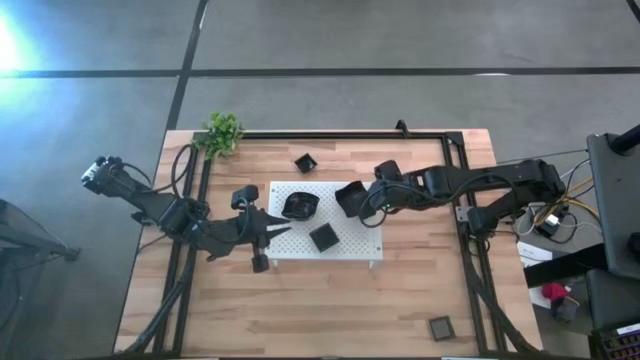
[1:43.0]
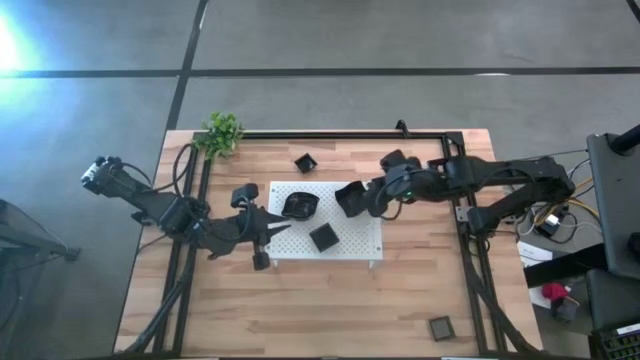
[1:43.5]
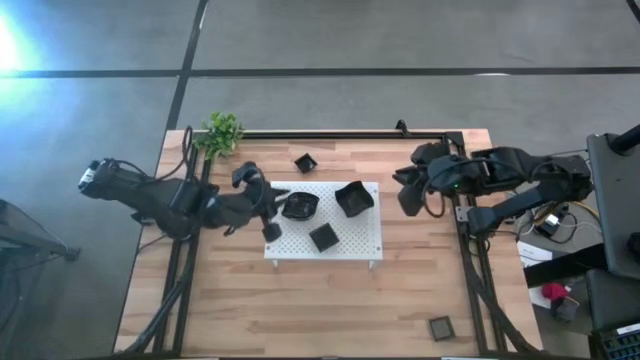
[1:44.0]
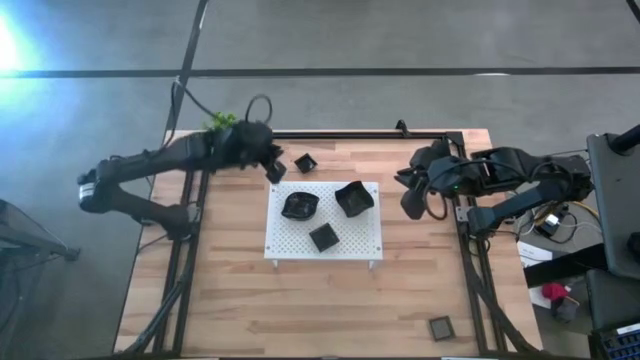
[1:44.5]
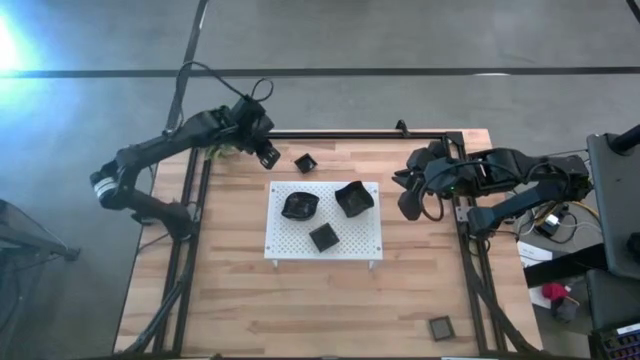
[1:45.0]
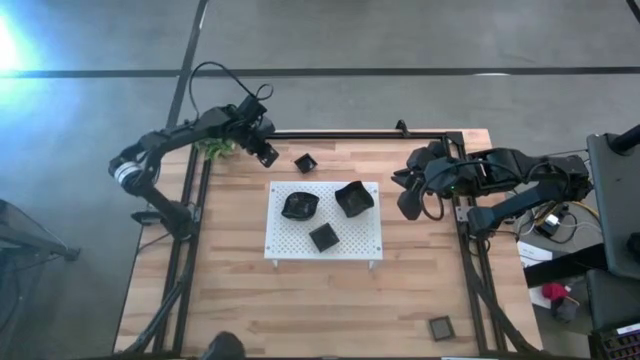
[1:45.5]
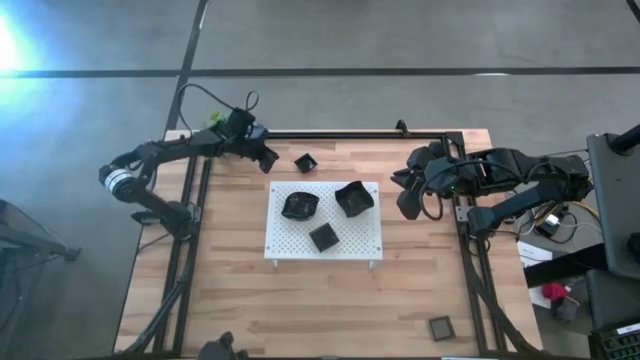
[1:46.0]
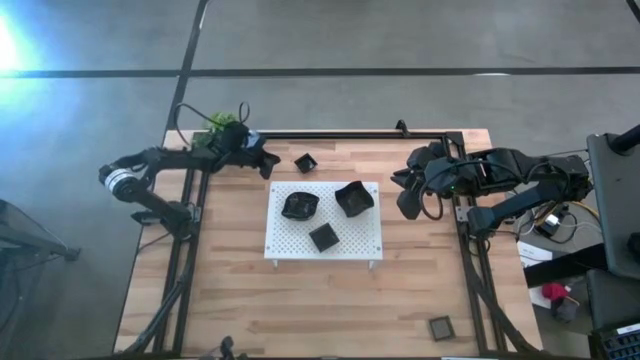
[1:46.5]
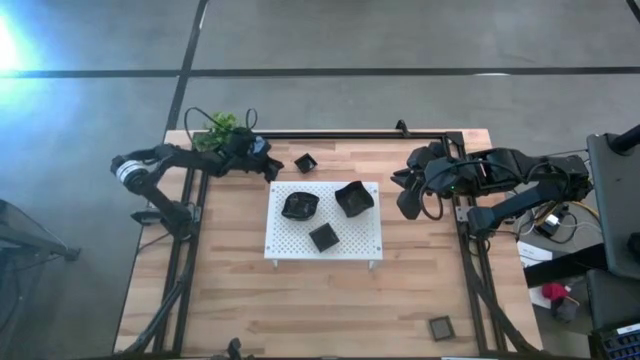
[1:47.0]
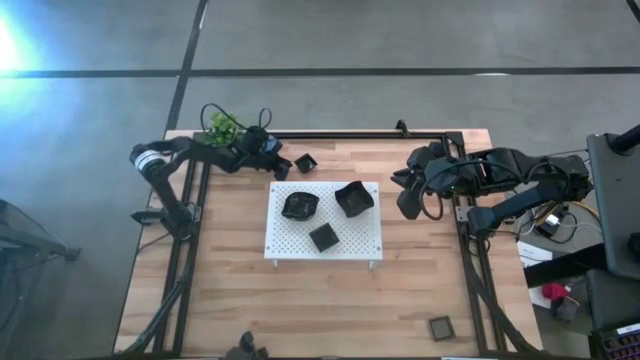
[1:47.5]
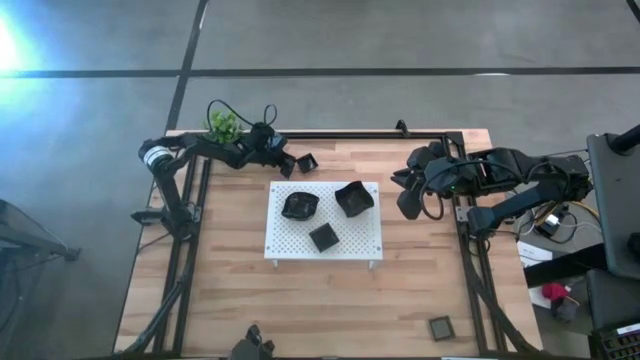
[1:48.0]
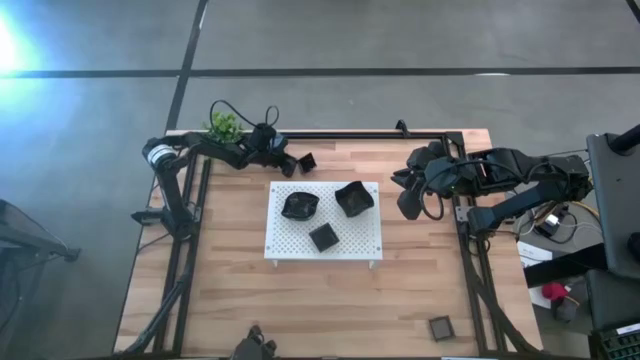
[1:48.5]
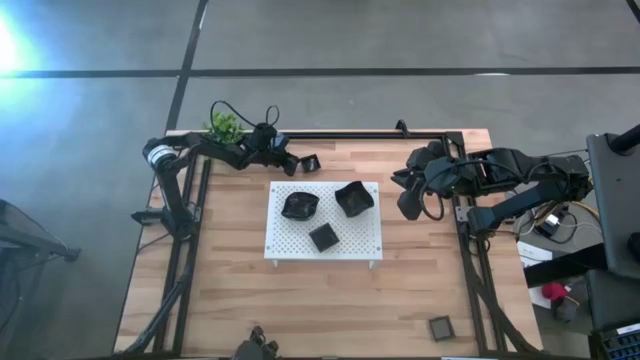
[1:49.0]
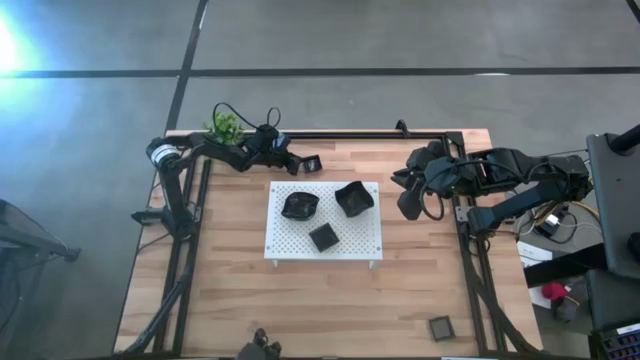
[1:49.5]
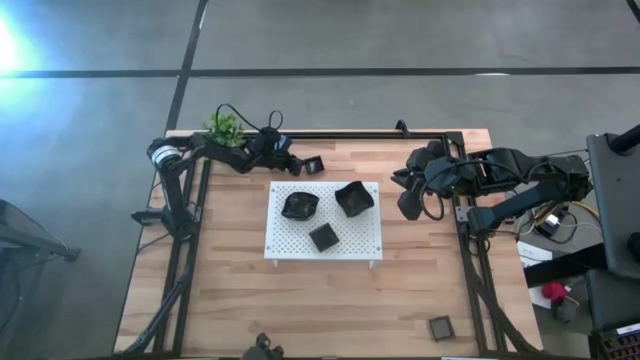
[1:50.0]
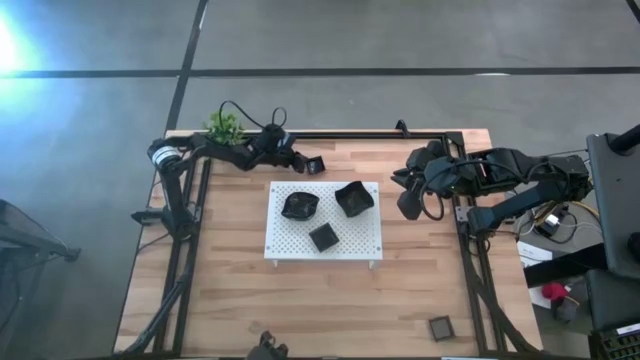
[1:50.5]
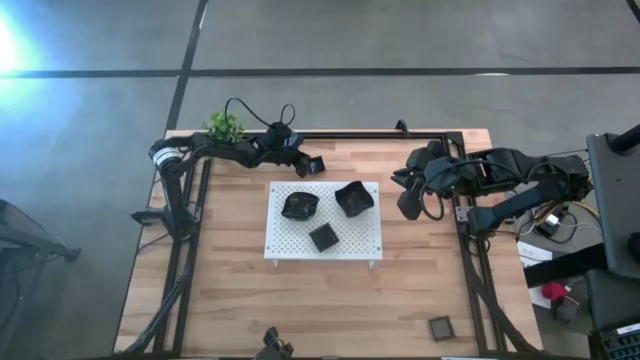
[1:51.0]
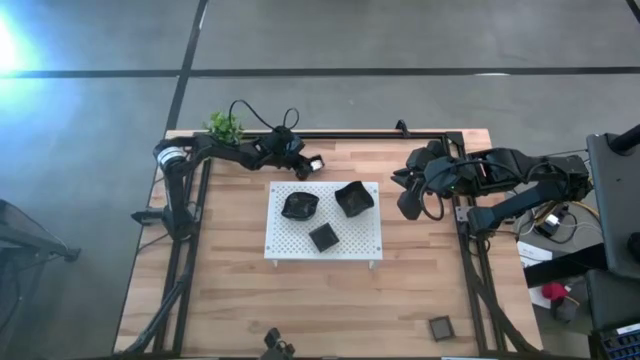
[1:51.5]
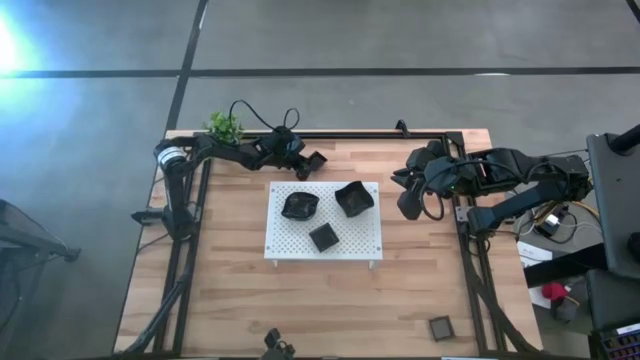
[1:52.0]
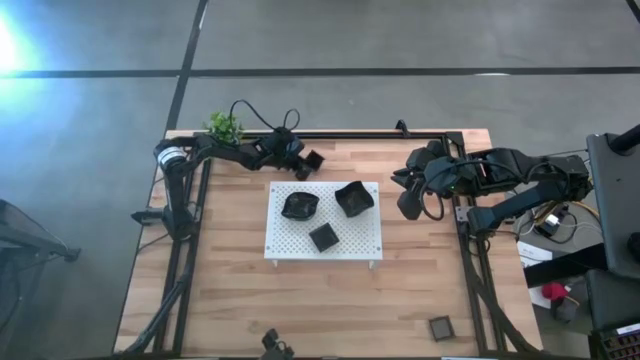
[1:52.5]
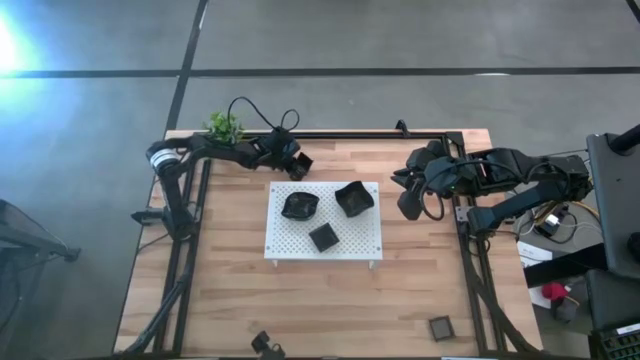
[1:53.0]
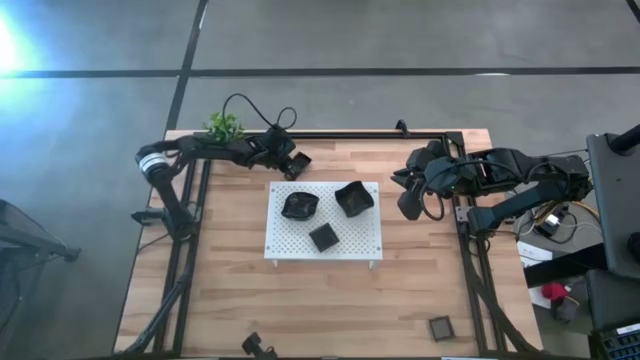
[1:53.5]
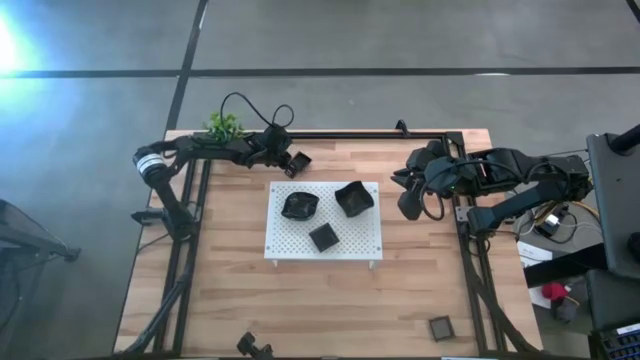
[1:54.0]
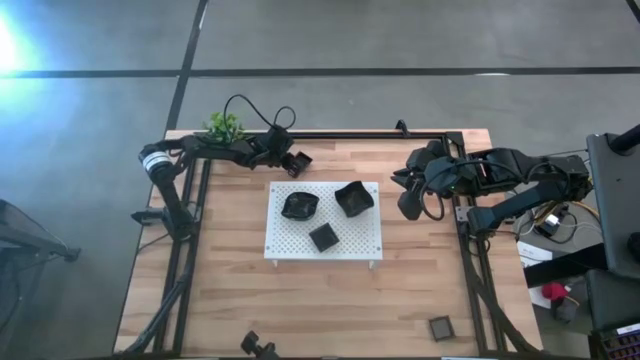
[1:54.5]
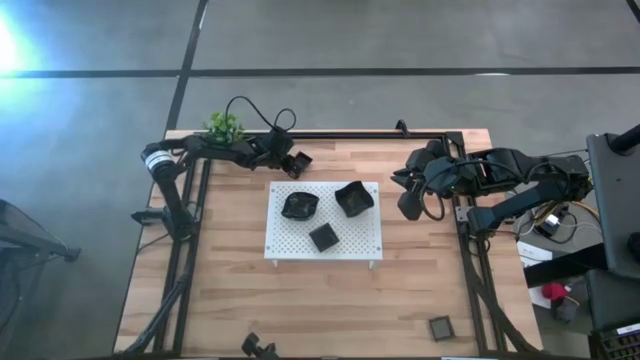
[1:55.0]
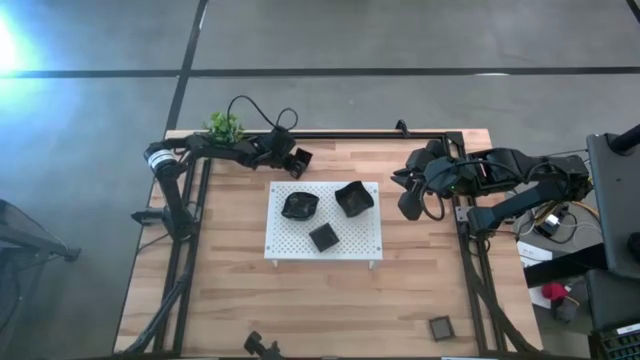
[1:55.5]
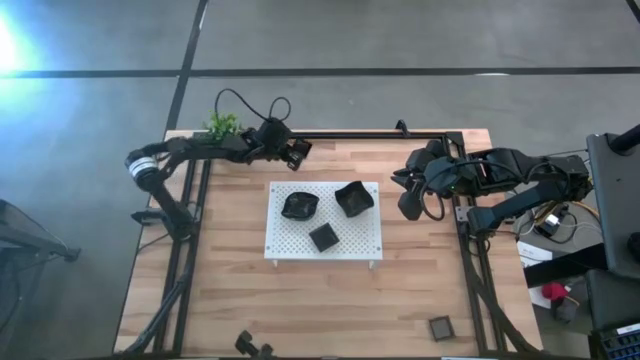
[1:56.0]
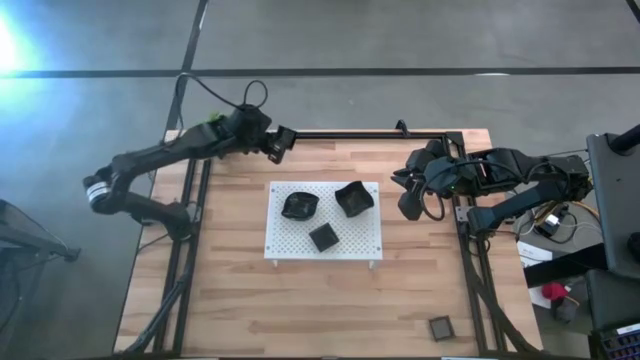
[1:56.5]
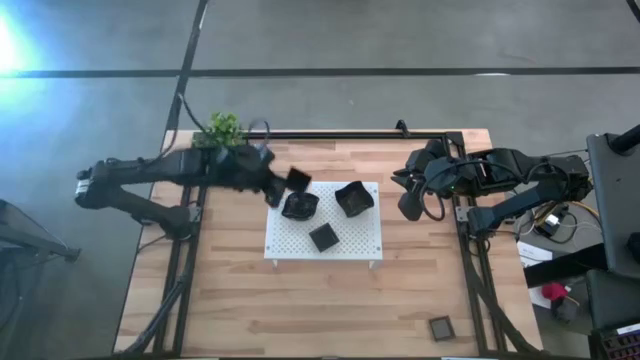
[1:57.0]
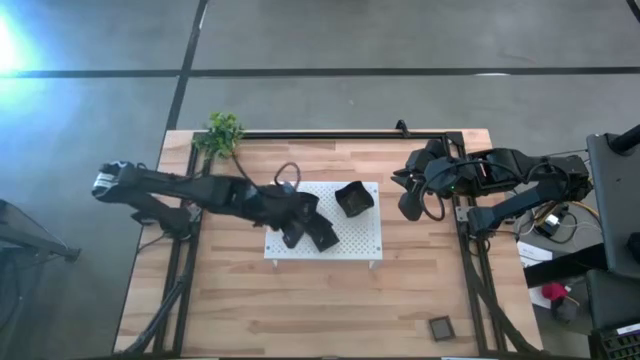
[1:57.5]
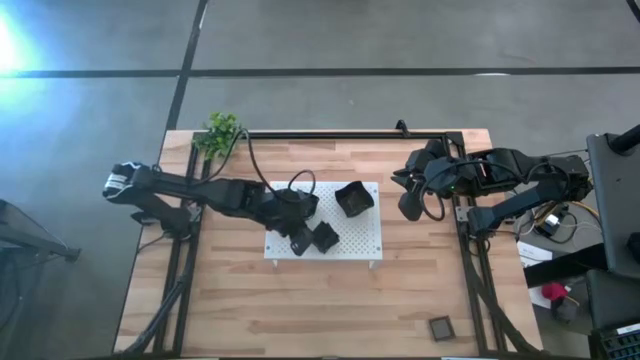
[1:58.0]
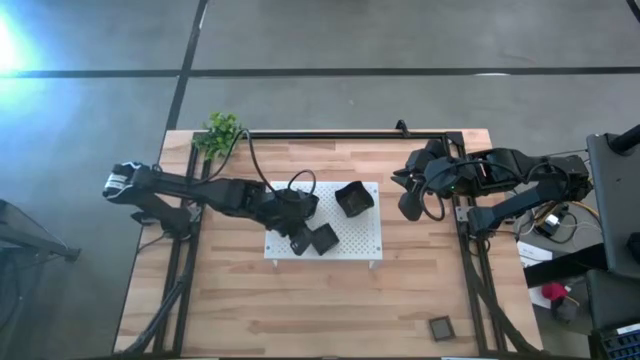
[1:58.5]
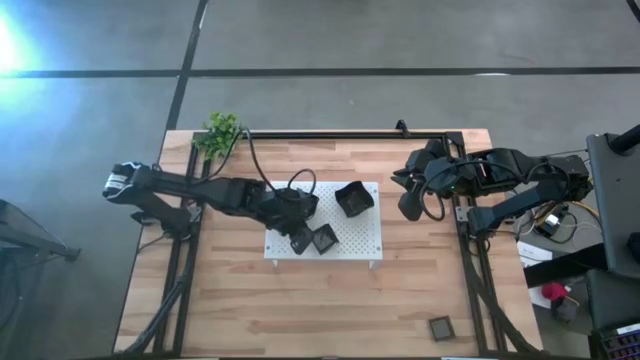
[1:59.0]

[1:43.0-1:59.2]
Task: Pick & Place Mini shaped plates
Stack the black square plate on top of the black square plate on the shelf

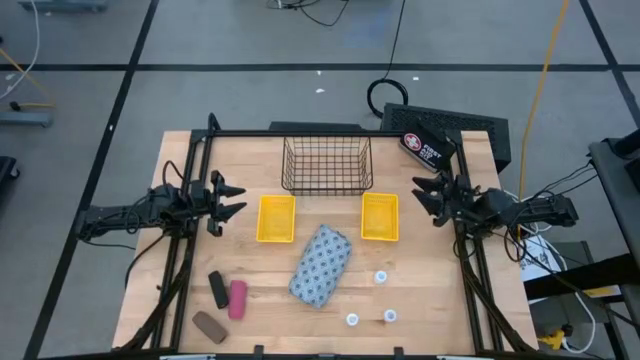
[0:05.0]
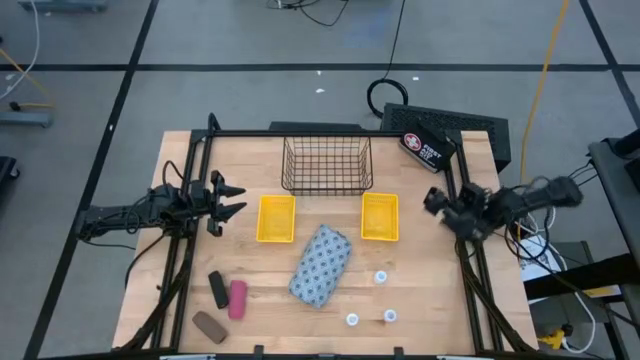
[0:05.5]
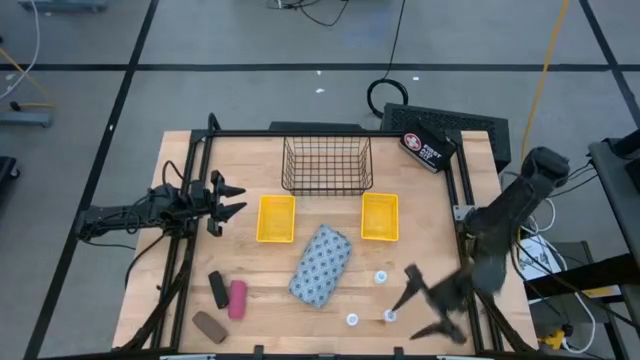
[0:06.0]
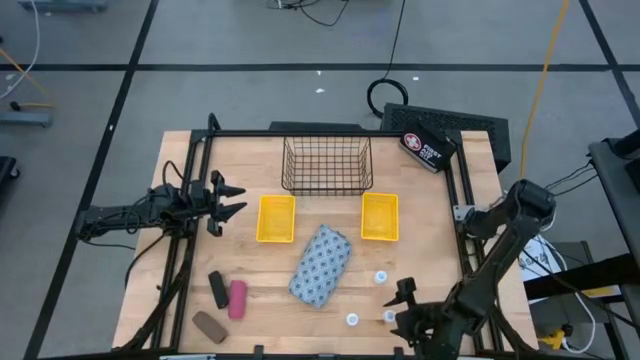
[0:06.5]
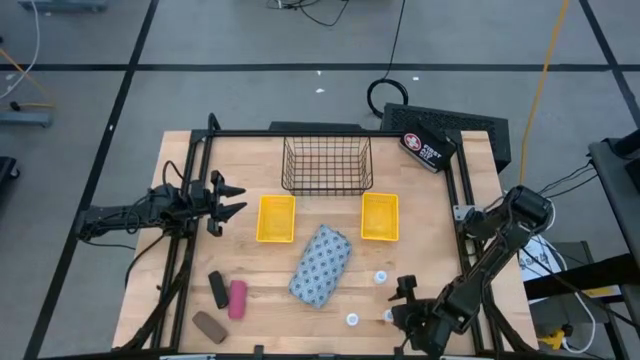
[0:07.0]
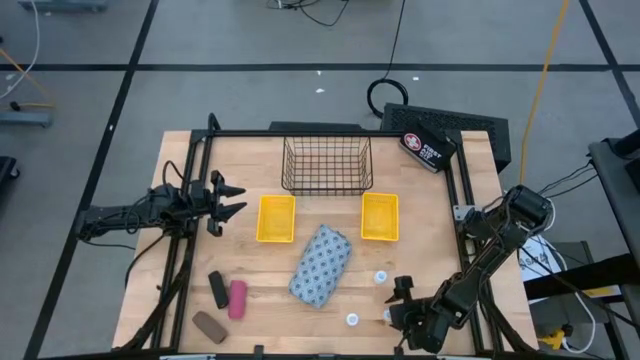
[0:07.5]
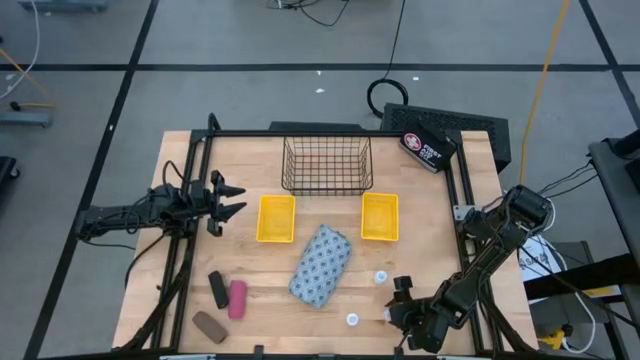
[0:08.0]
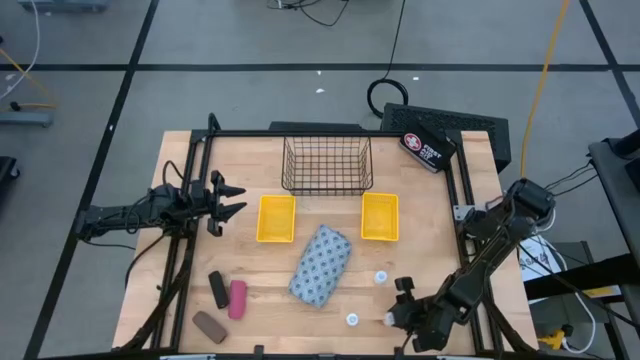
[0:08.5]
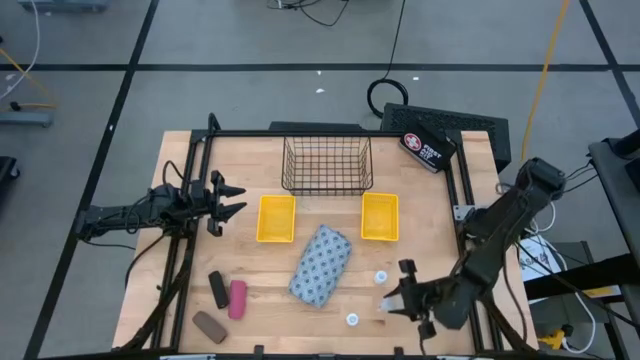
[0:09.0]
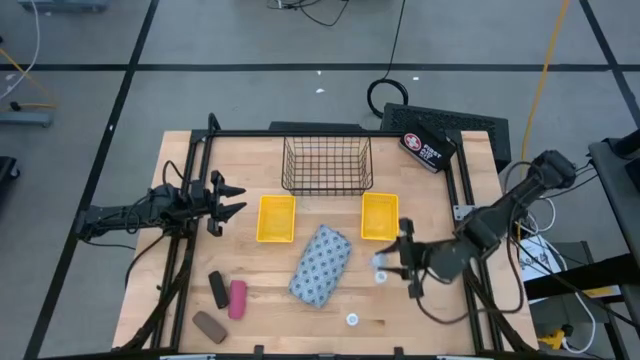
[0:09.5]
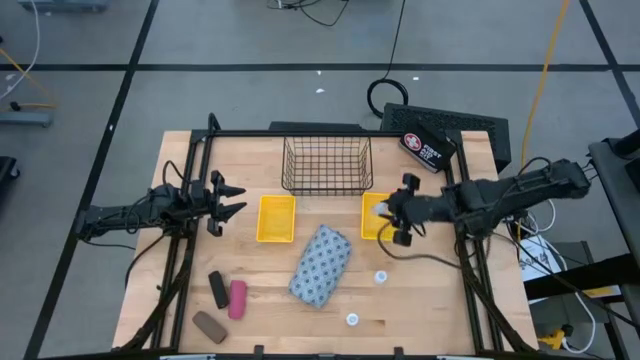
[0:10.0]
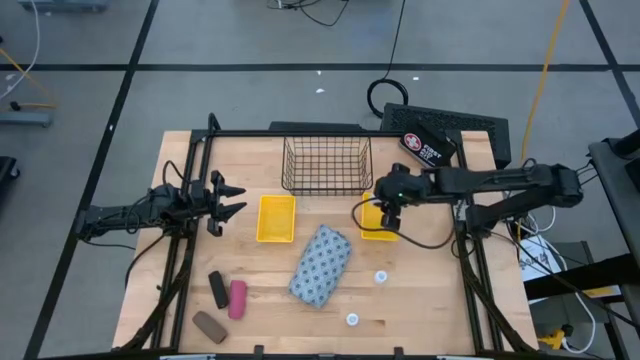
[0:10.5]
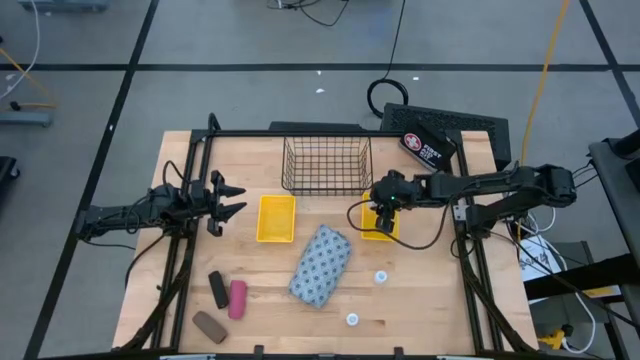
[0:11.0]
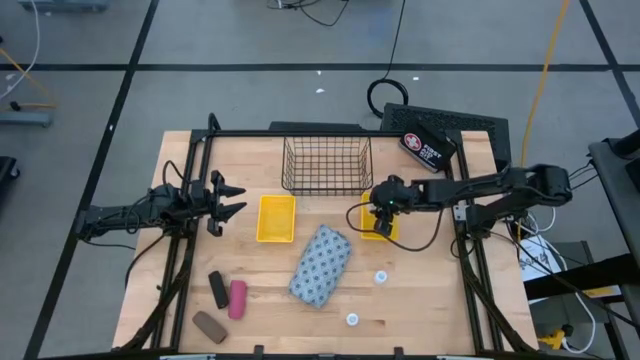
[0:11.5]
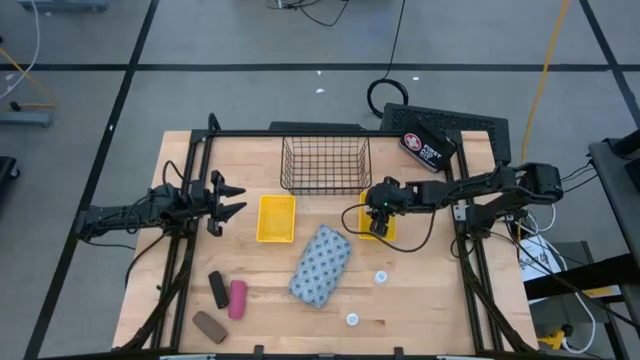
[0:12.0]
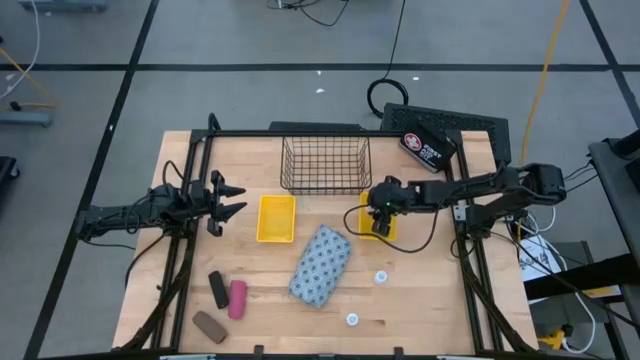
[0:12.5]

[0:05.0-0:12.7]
Task: Pick & Place Medicine items
Put the bottom right transparent pill bottle into the right yellow basket
